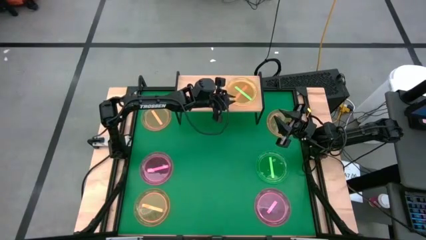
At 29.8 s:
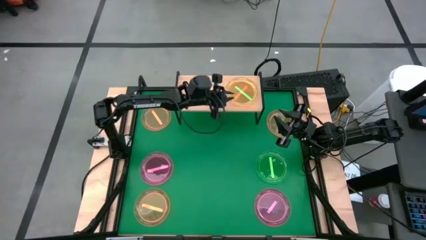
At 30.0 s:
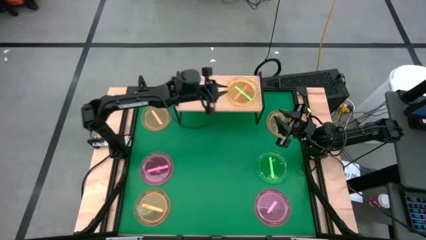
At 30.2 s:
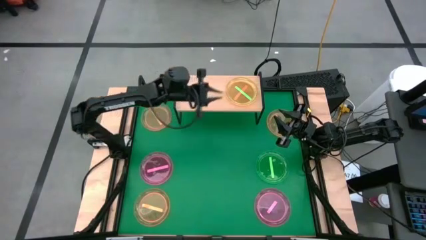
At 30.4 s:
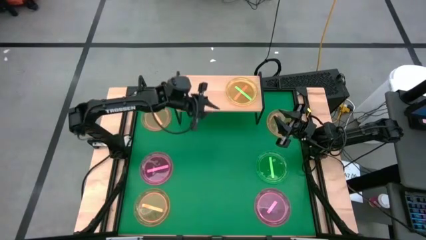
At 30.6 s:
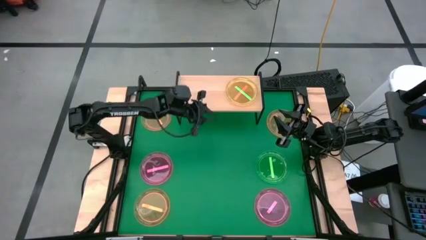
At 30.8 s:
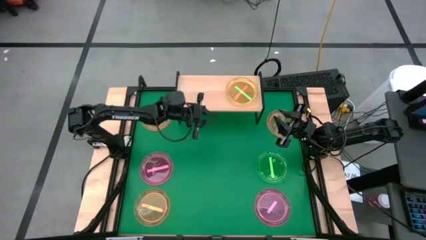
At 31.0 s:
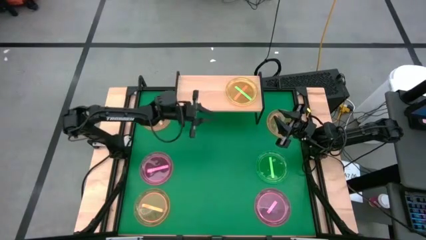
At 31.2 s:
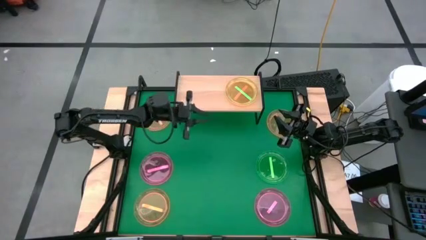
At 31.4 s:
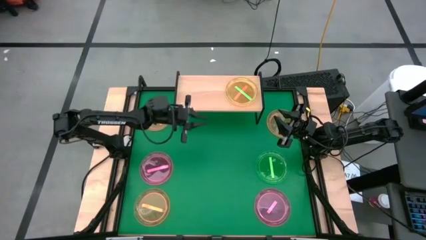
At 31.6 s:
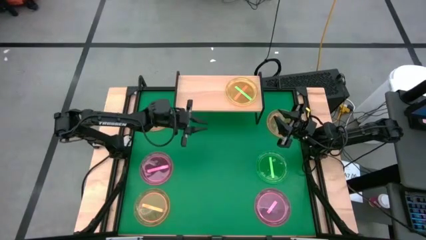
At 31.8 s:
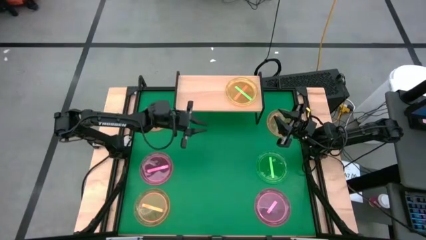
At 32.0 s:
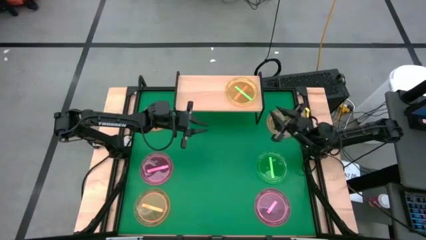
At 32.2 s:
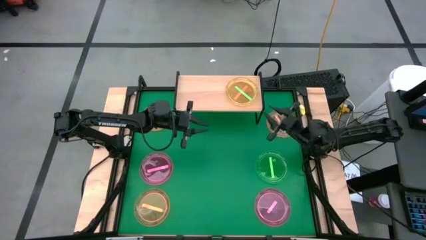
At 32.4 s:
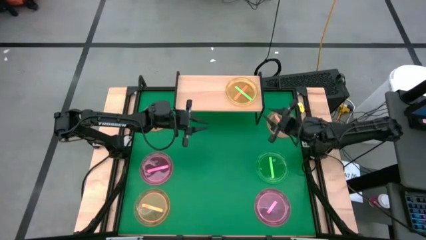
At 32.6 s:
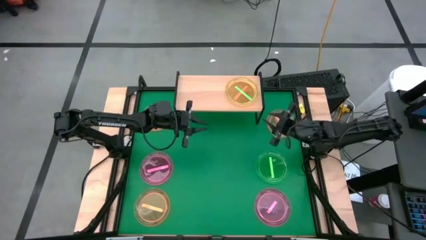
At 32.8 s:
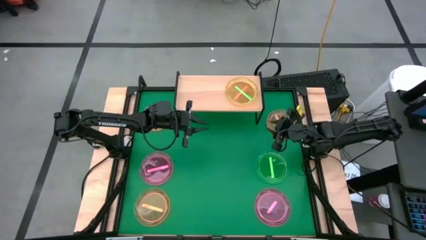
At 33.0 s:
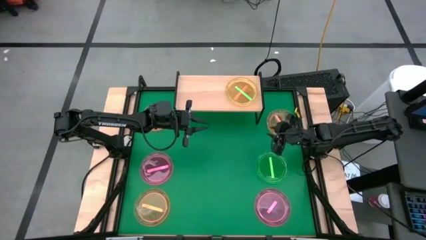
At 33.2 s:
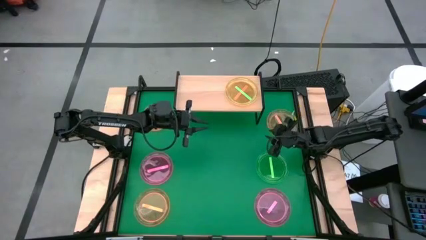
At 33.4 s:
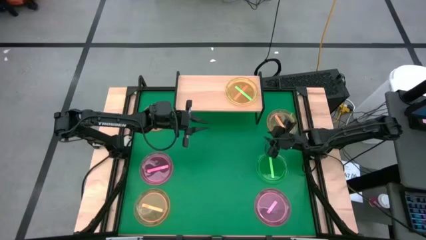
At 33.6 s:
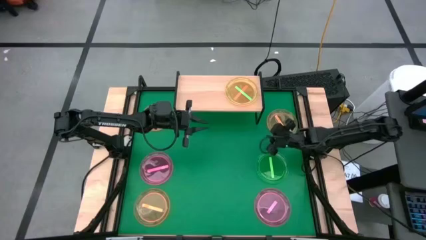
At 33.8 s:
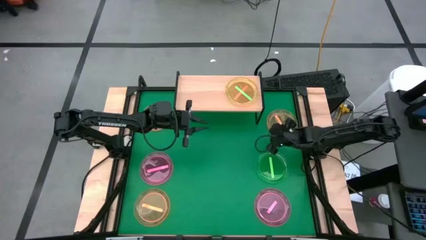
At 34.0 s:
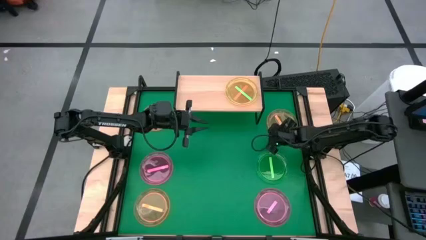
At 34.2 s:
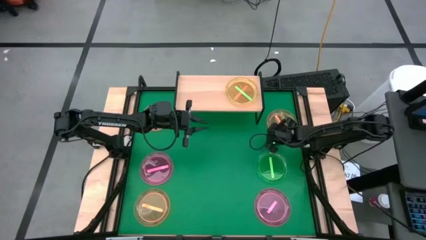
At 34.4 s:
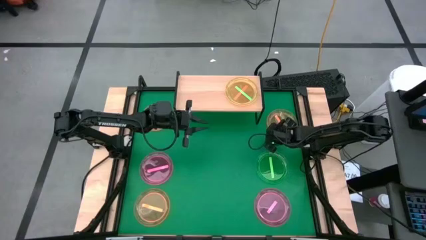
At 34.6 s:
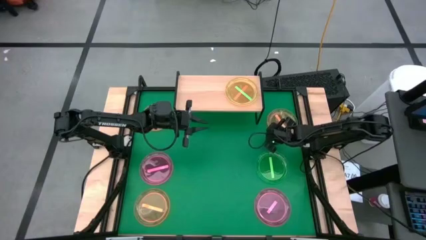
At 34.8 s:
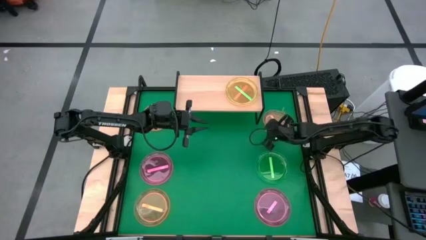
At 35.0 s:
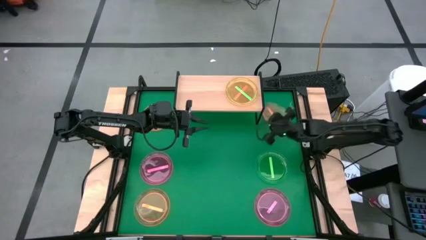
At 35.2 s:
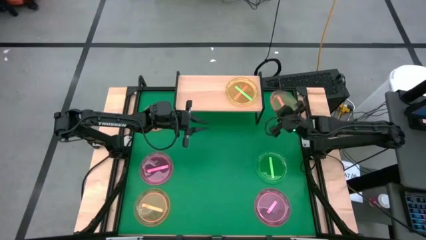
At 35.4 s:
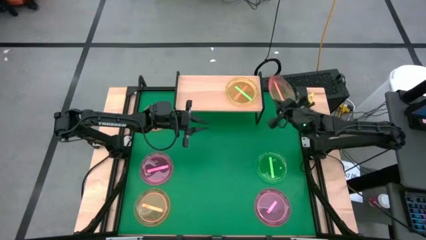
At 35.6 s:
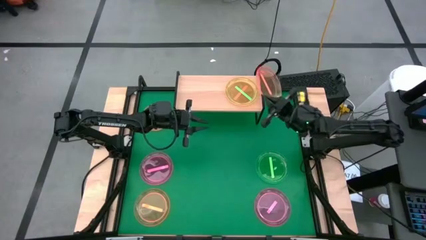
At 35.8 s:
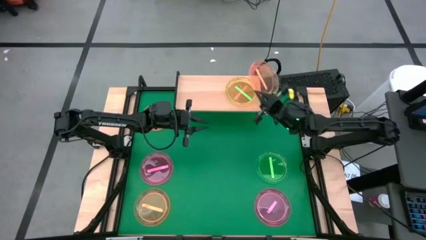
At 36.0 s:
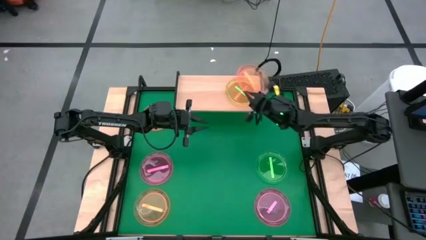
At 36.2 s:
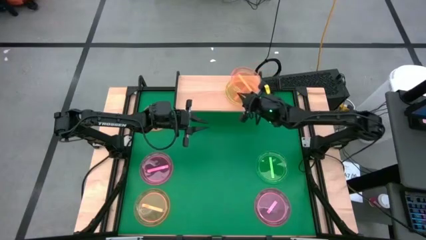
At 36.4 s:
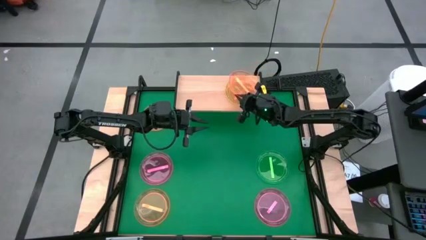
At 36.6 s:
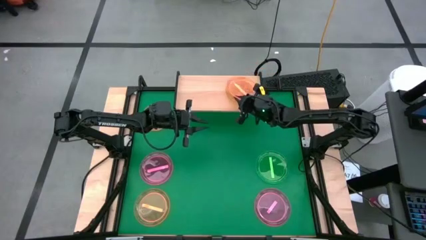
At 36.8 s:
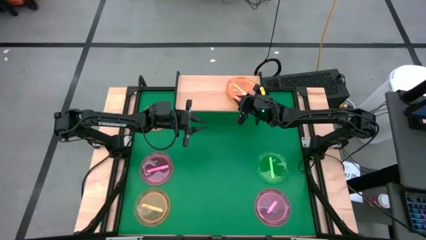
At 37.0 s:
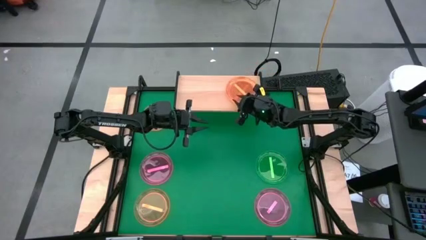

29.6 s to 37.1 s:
Task: Place and stack plates onto a shelf
Stack the orange plate on top of the green plate on the shelf

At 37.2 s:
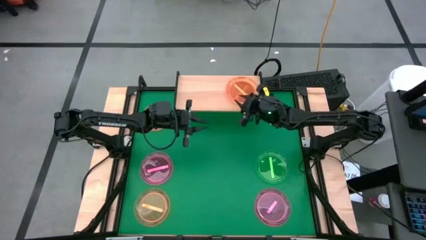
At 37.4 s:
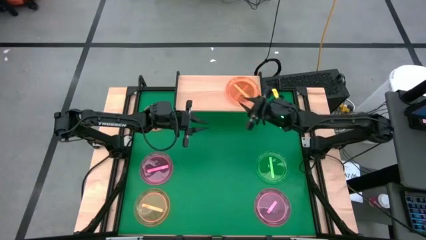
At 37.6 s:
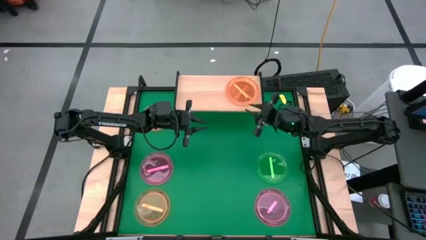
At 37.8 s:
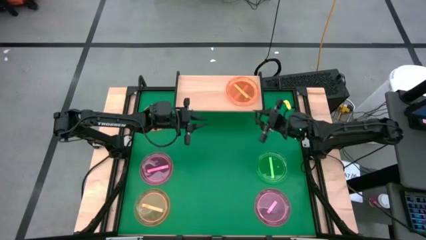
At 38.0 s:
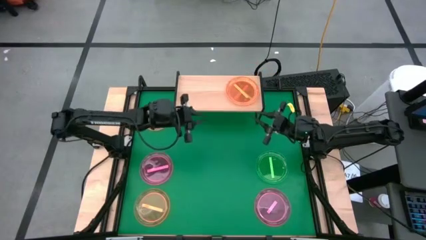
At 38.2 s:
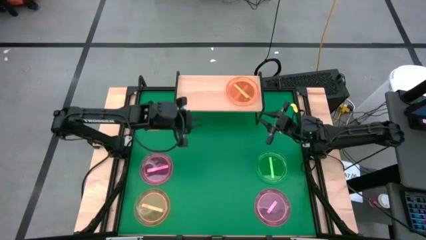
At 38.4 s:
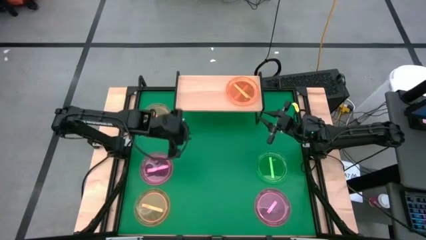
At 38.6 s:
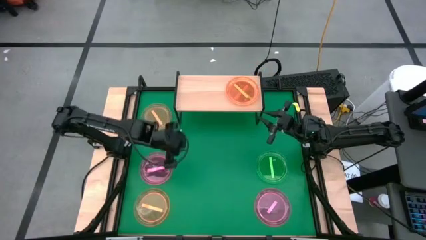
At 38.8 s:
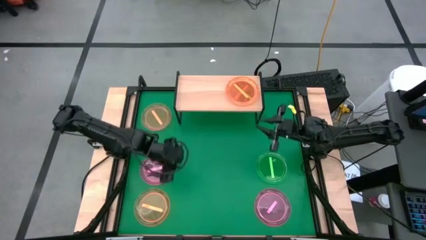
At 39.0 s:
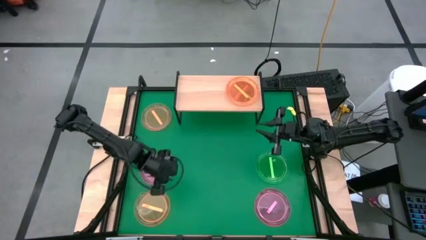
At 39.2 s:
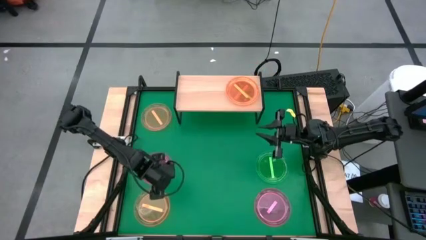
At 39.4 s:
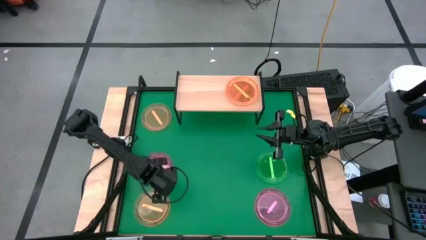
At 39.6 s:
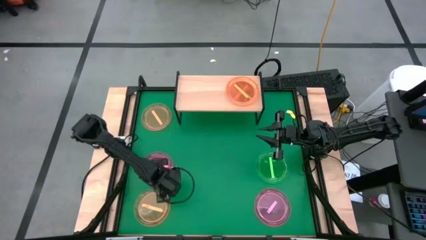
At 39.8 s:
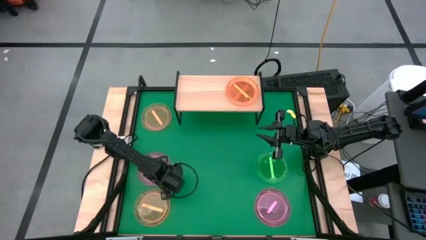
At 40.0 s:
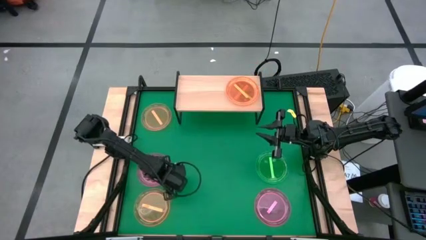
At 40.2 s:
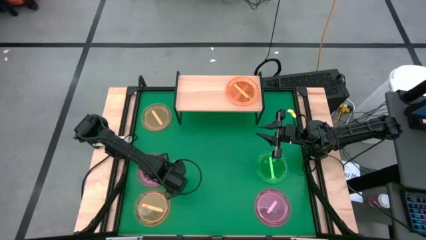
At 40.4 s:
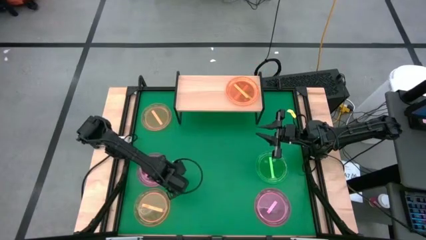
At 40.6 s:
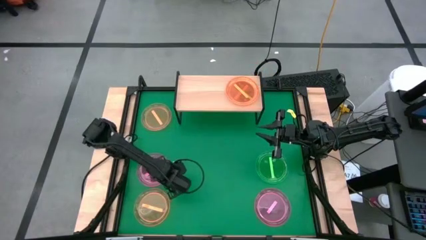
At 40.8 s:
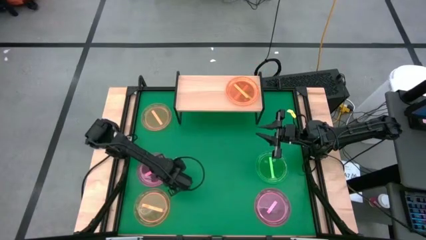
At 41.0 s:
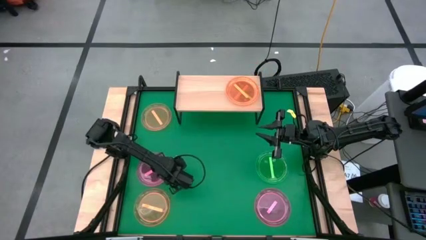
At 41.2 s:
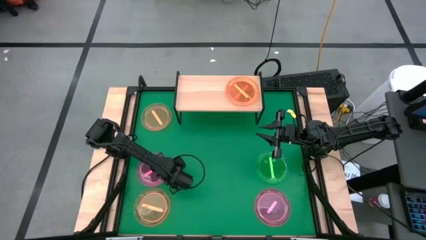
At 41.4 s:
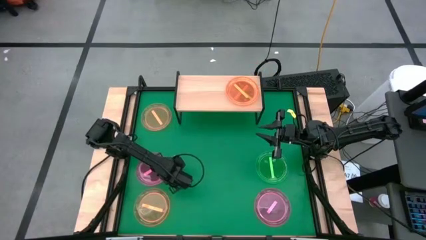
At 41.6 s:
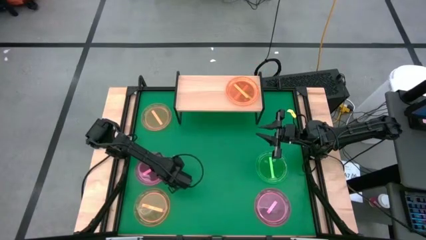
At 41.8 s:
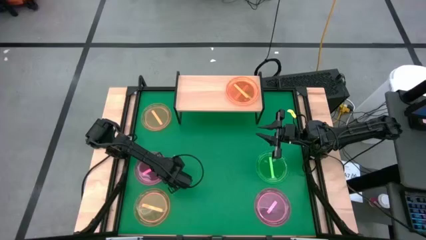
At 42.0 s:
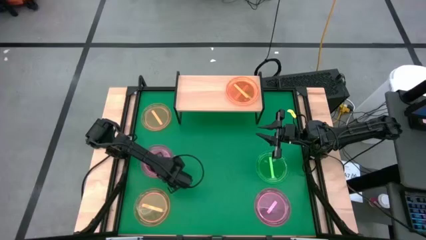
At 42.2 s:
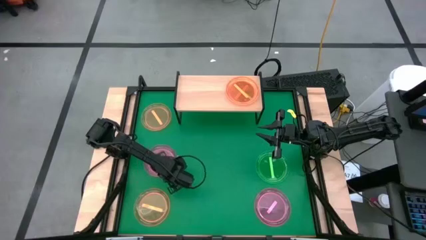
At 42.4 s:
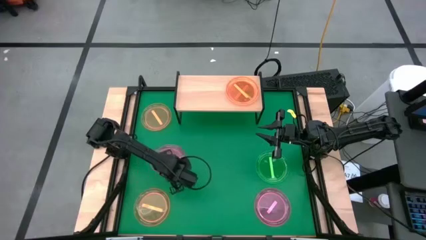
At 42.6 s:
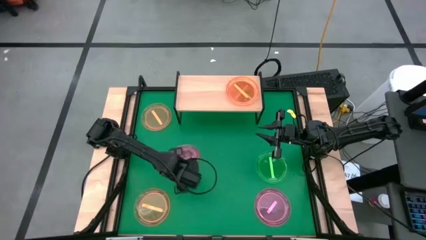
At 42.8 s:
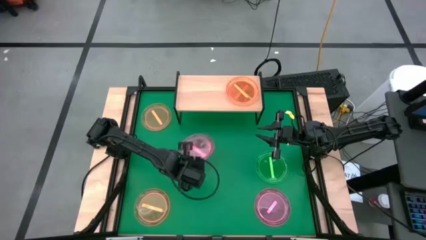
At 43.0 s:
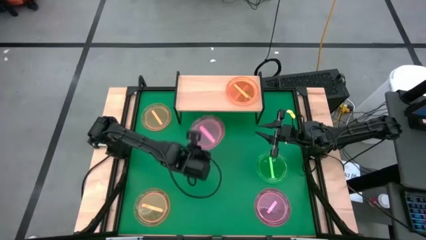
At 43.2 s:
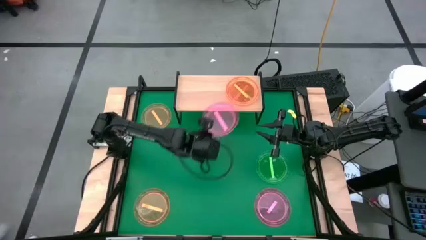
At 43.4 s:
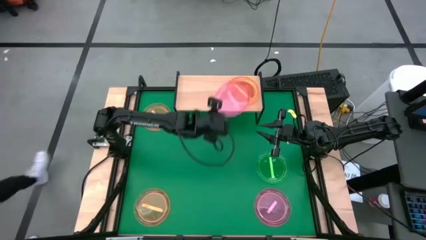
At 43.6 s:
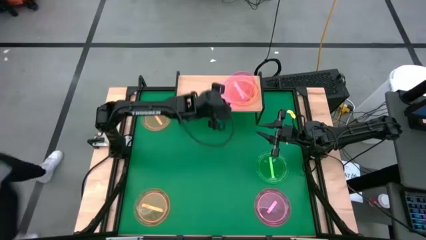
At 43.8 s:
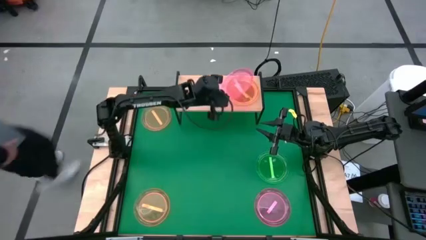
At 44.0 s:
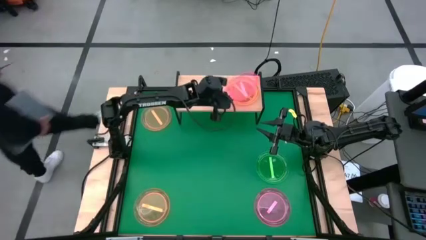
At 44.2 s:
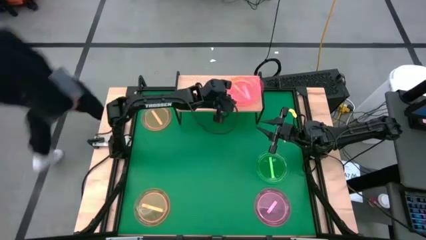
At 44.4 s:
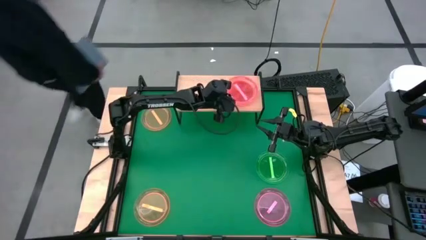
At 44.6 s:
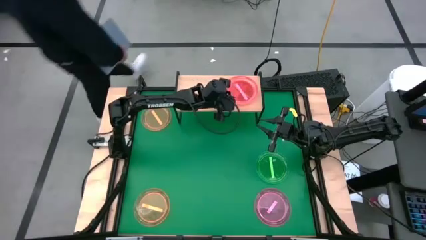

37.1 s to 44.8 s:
Stack the pink plate on top of the orange plate on the shelf
